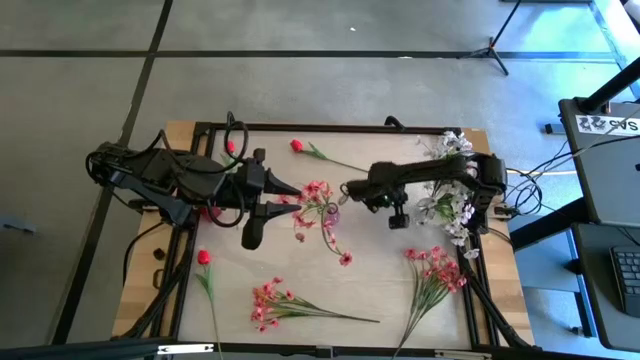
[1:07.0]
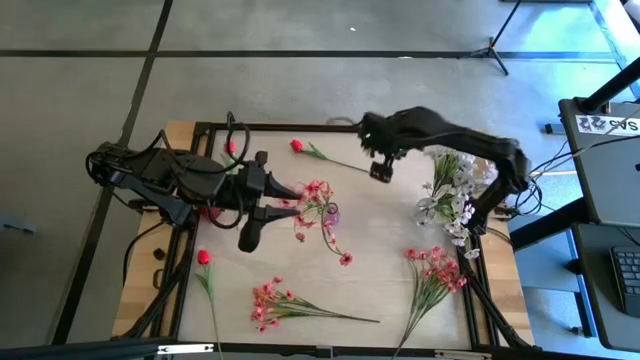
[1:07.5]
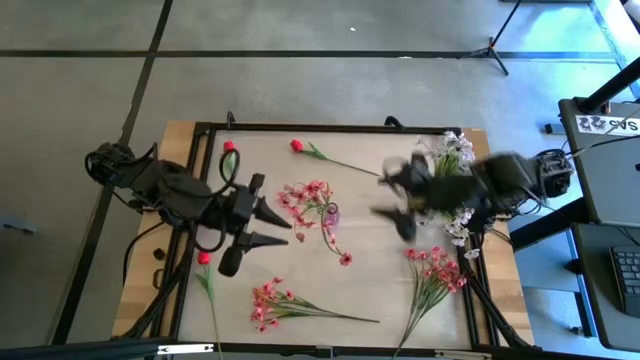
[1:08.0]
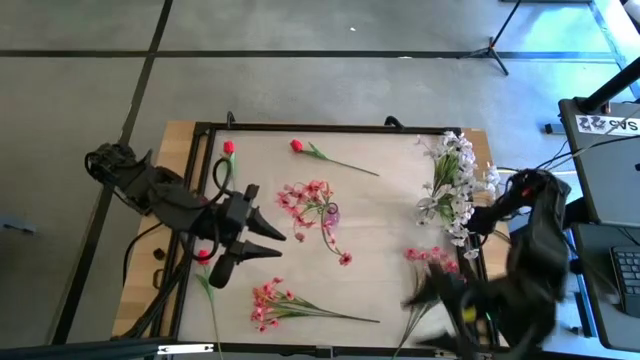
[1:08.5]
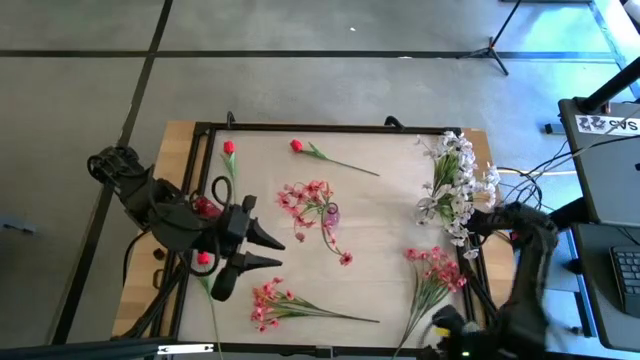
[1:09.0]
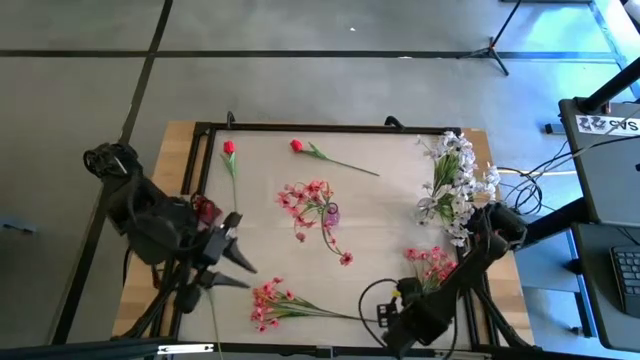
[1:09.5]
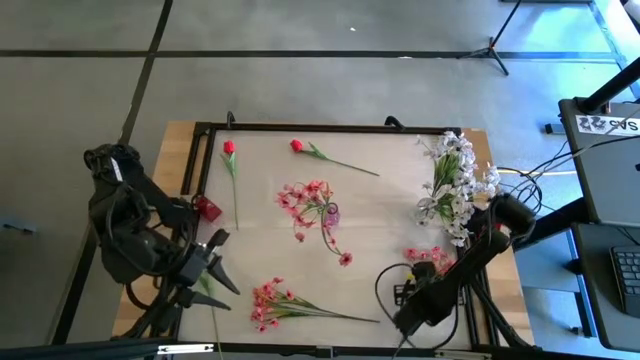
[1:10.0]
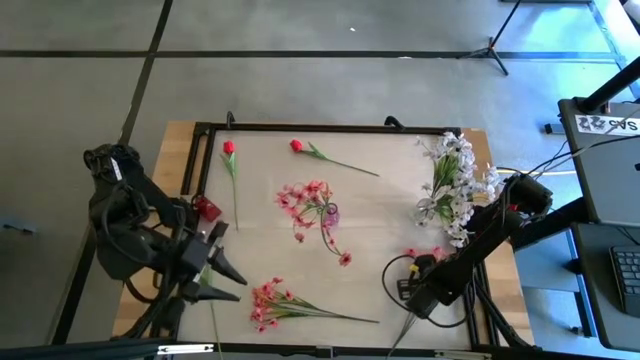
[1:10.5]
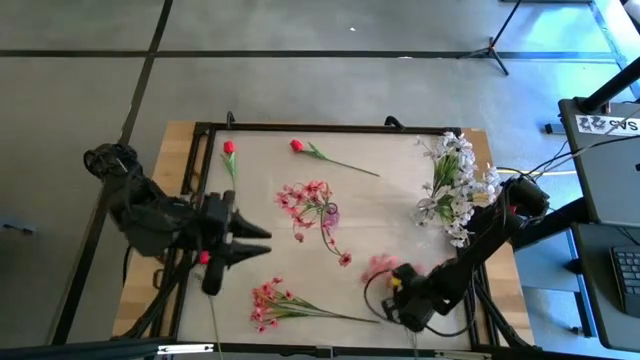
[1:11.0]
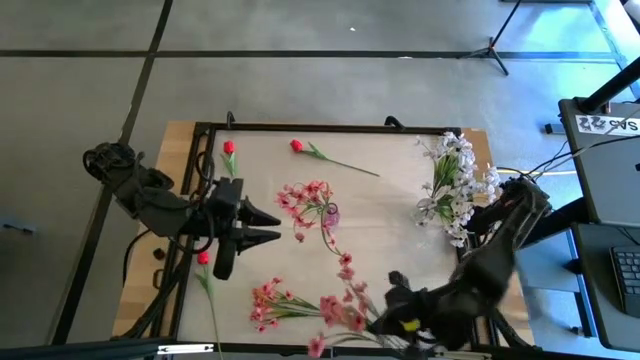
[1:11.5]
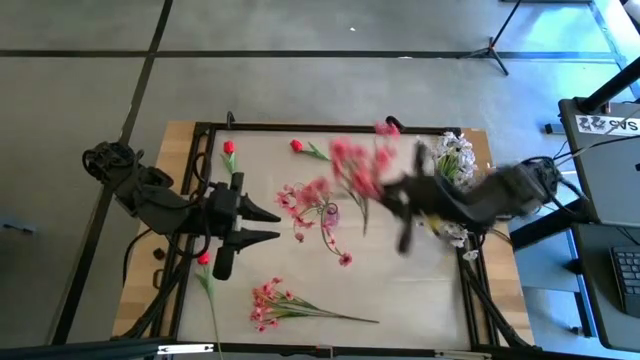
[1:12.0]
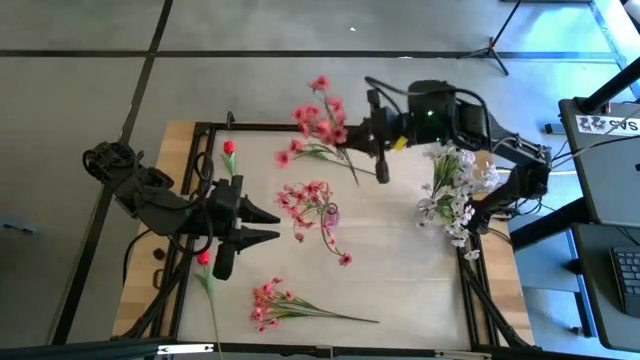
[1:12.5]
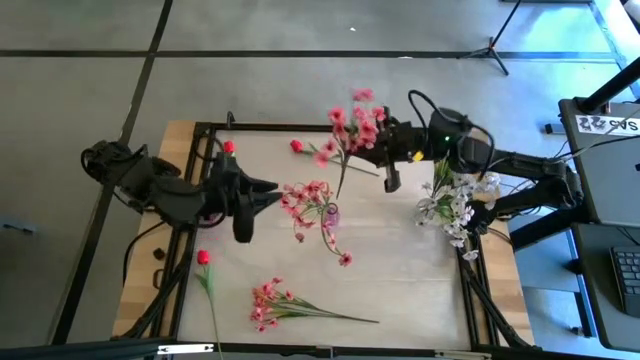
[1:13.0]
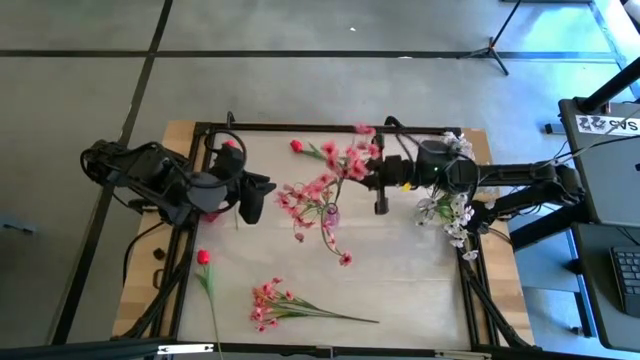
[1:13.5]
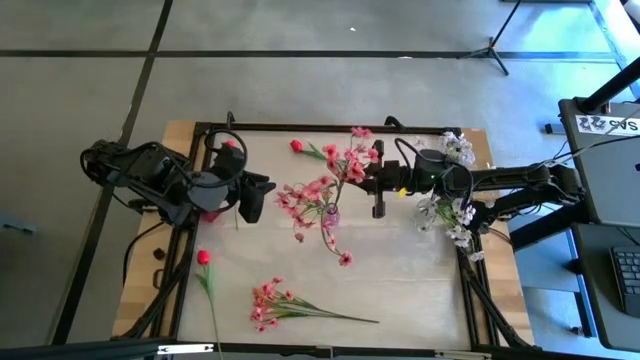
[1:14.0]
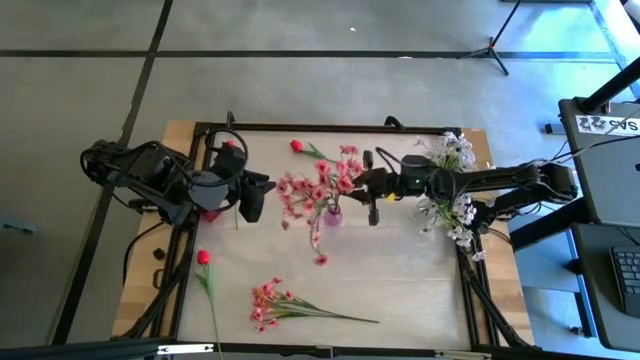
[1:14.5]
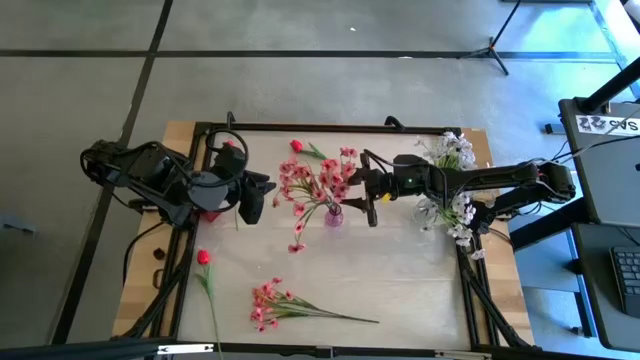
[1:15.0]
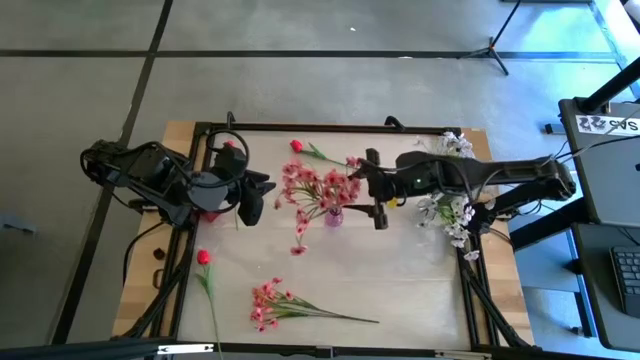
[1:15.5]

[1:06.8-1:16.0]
Task: Sort flowers into vase by color
Put the right pink flowers in the violet vase

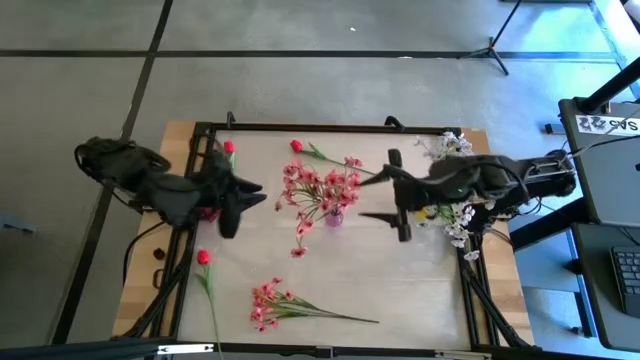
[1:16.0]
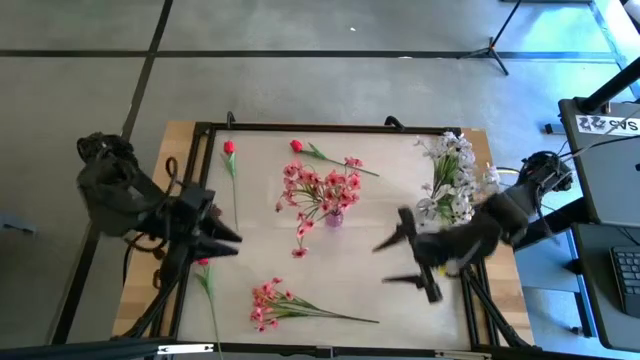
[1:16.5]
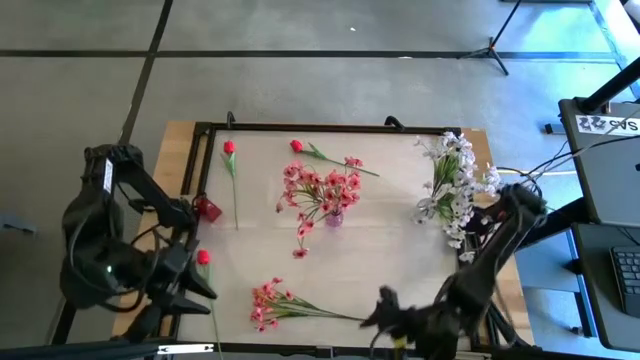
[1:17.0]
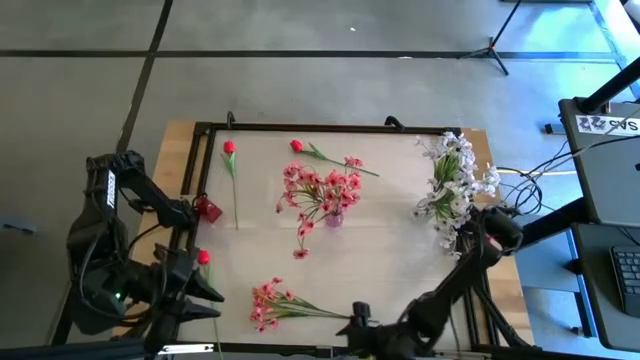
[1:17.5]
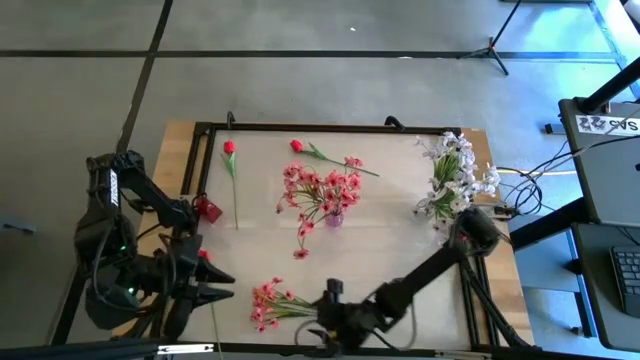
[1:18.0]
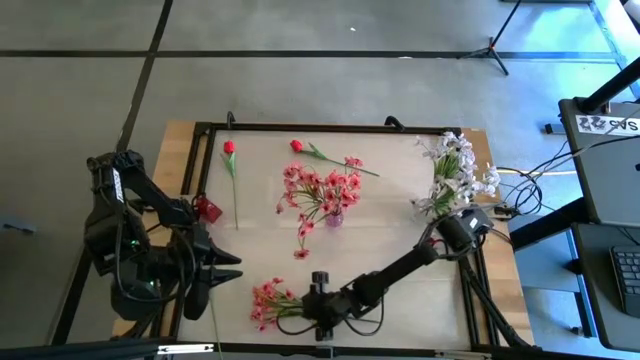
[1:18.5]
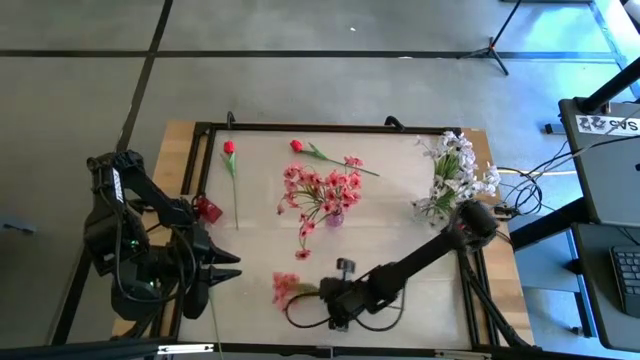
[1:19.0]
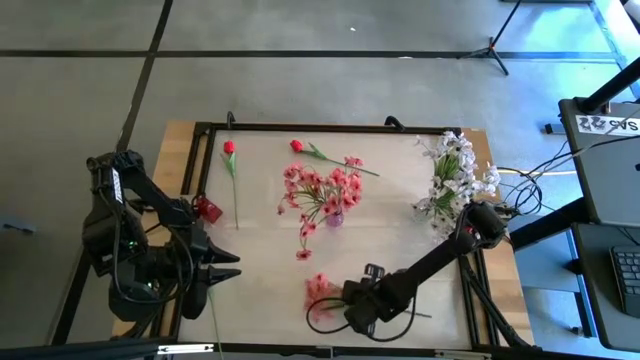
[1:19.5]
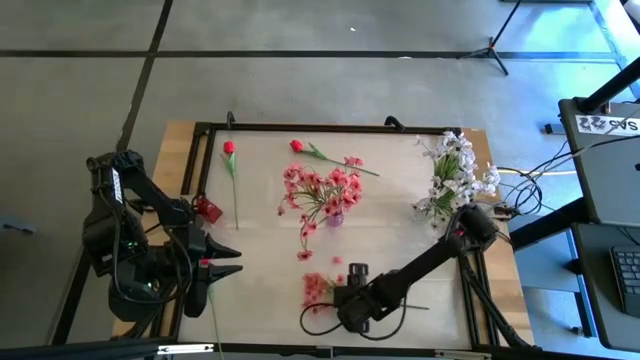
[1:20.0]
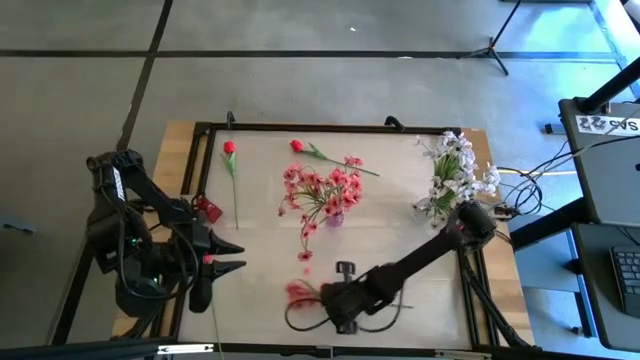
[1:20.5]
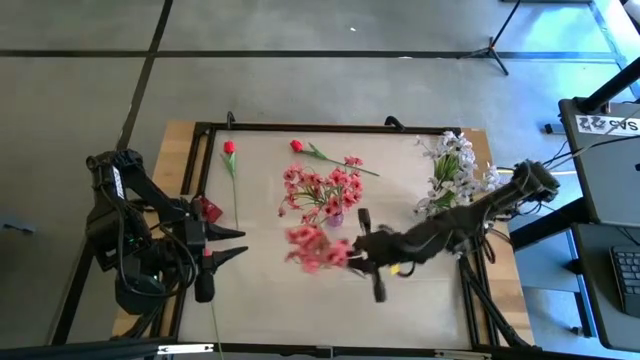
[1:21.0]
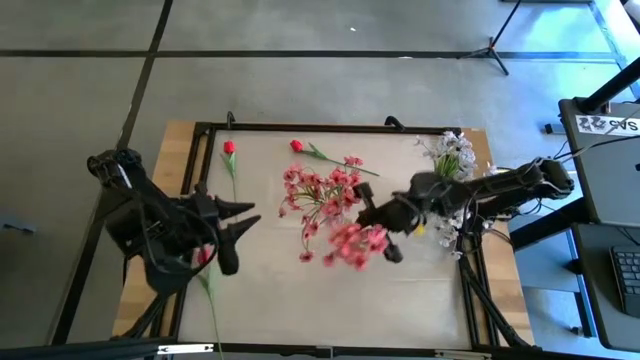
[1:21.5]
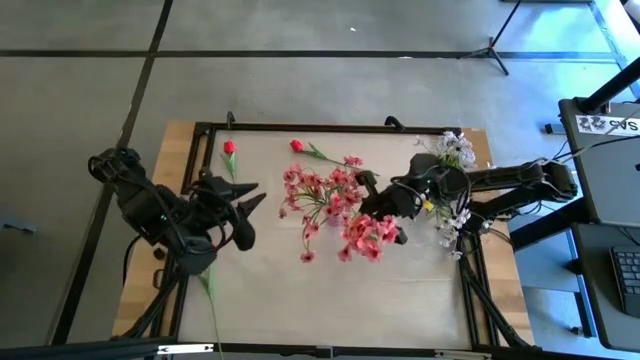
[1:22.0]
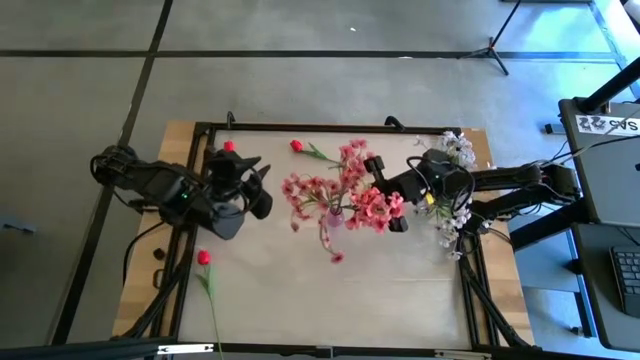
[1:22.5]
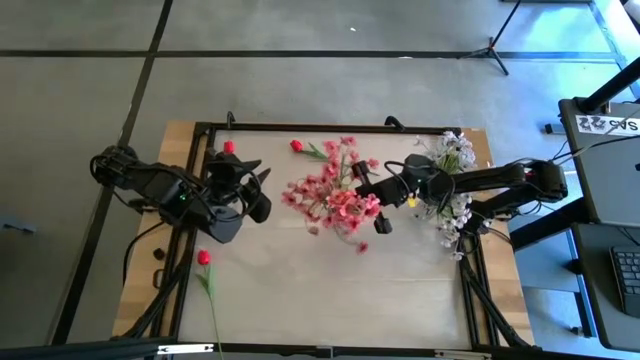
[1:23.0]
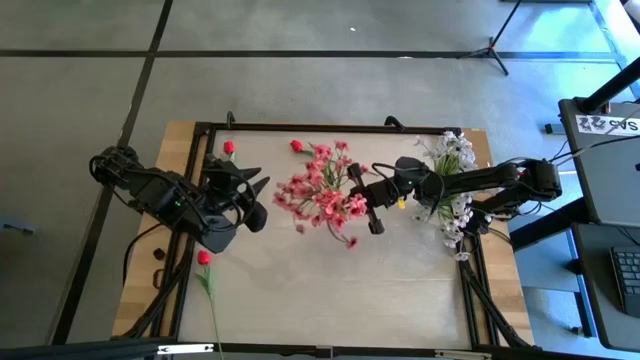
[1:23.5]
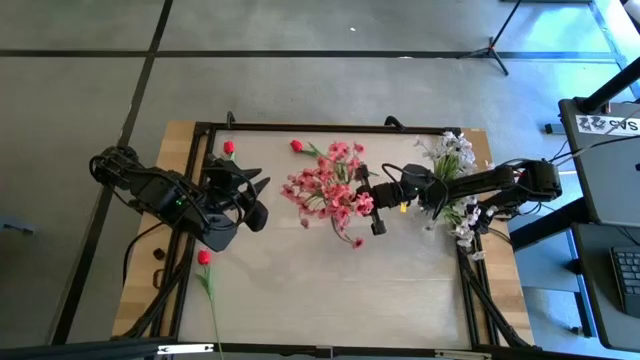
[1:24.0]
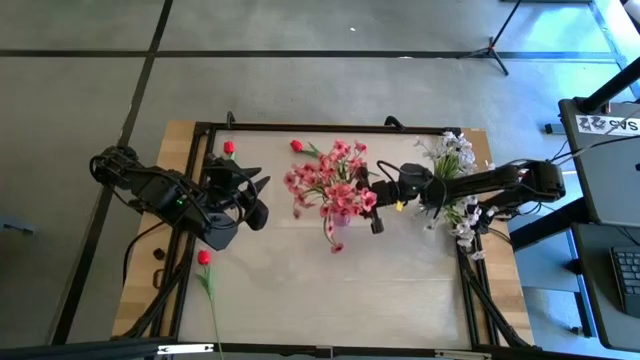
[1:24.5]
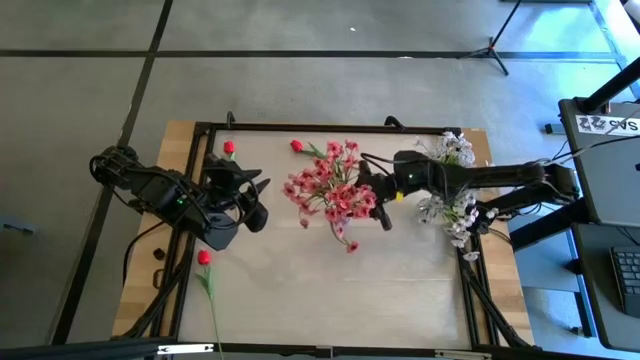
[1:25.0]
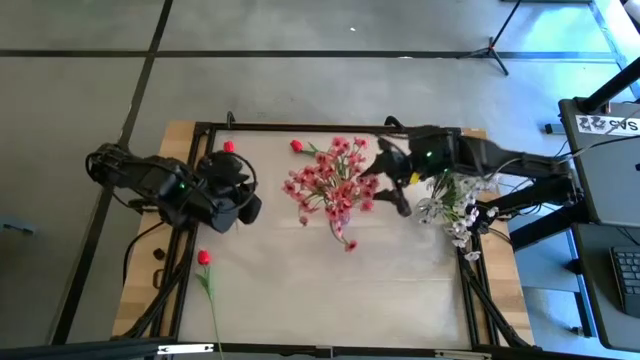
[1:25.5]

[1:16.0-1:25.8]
Put the pink flowers into the violet vase

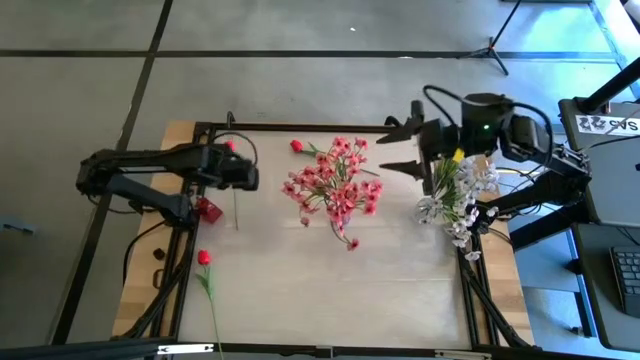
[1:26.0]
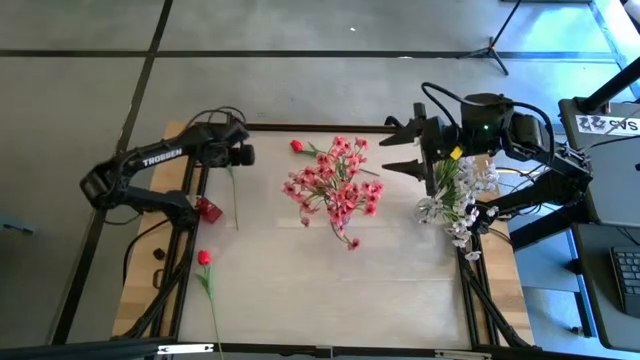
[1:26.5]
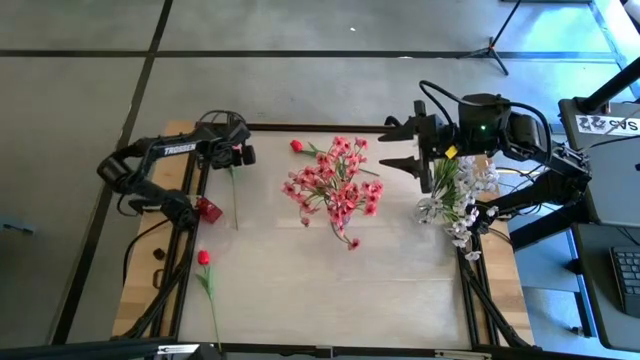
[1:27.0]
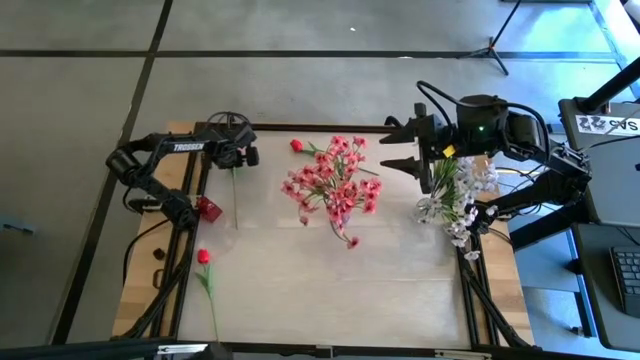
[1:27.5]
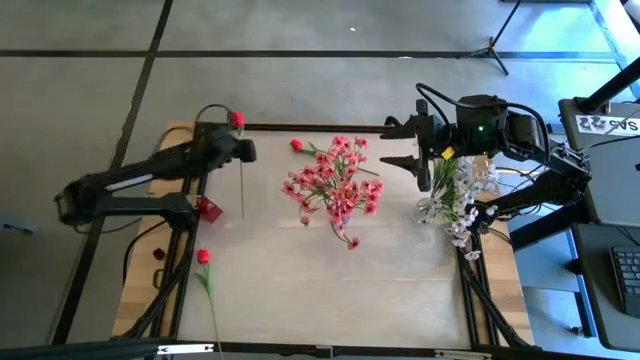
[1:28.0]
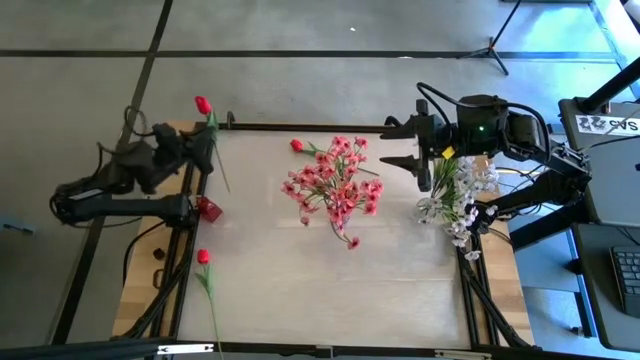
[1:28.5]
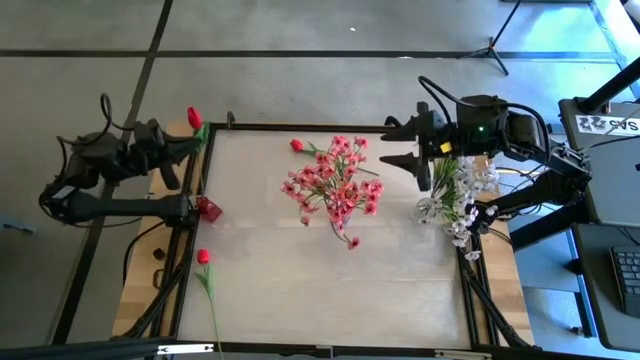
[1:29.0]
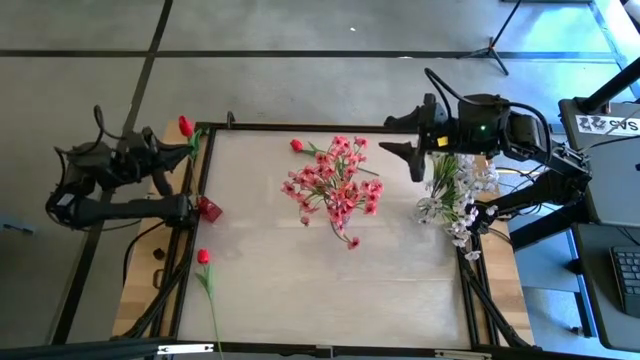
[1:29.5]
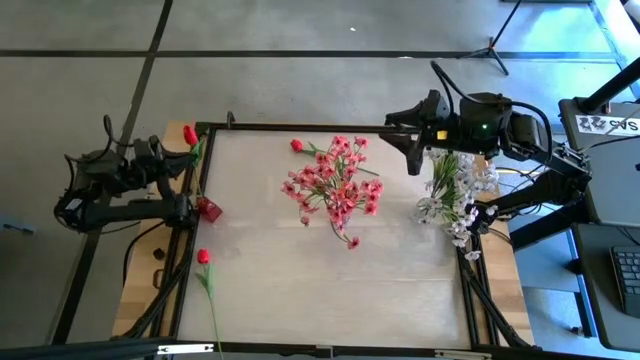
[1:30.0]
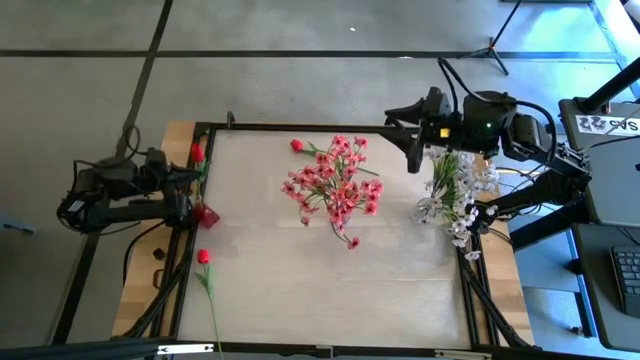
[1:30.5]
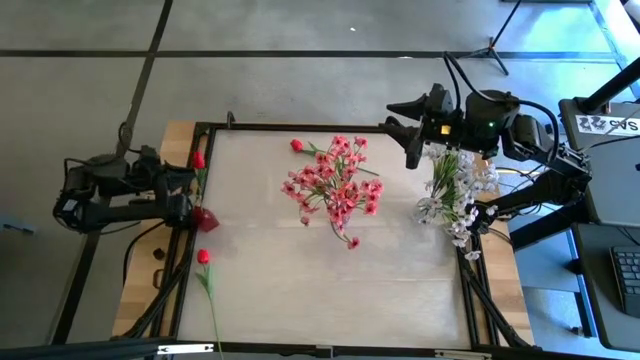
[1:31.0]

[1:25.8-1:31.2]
Put the top left red flower into the red vase
